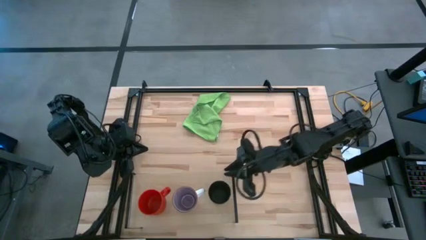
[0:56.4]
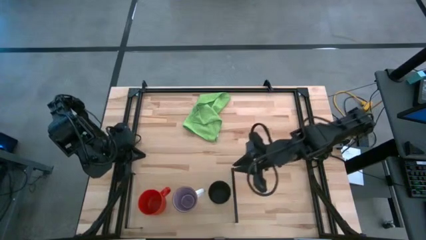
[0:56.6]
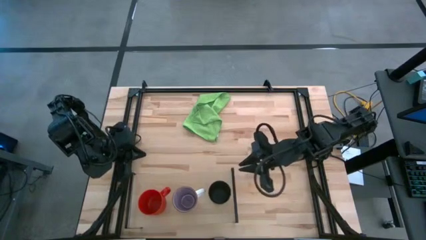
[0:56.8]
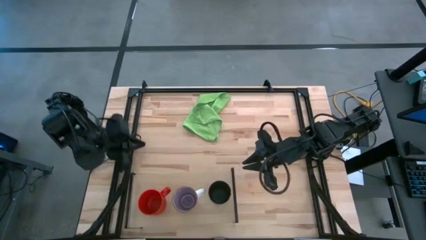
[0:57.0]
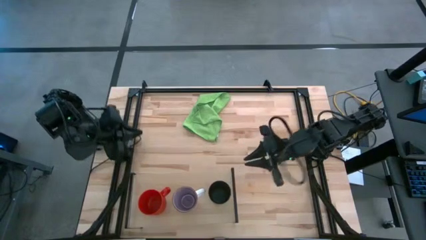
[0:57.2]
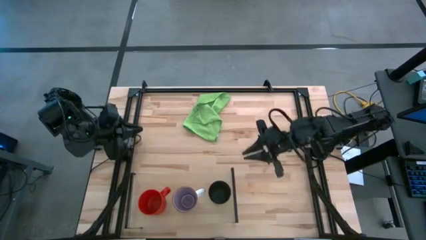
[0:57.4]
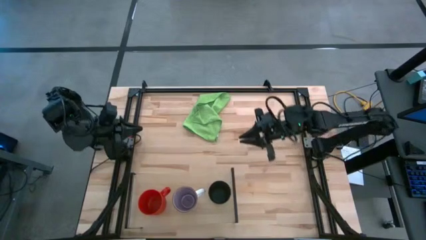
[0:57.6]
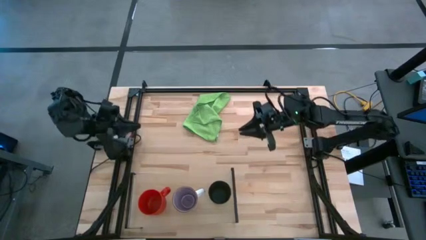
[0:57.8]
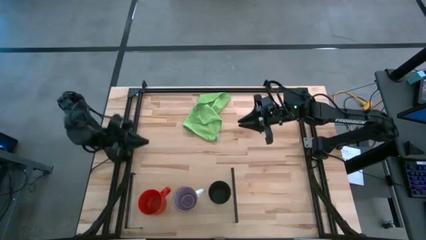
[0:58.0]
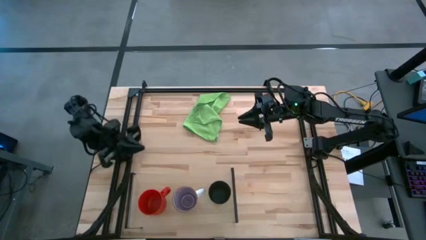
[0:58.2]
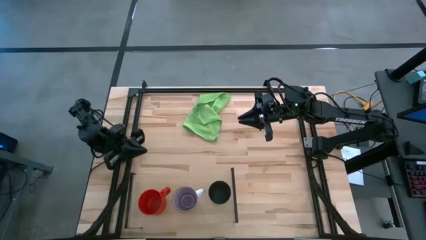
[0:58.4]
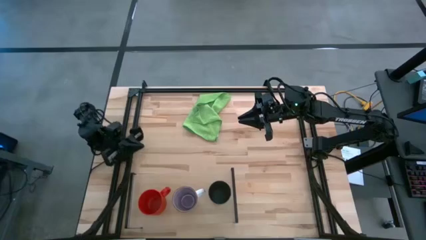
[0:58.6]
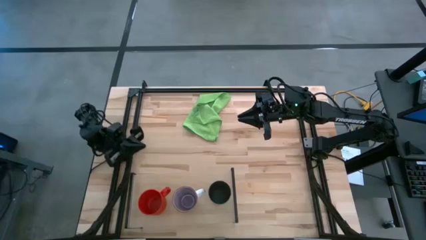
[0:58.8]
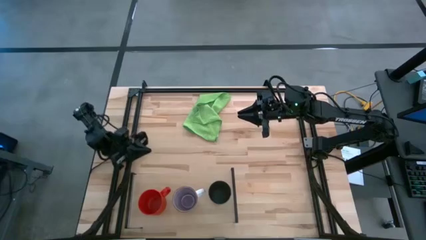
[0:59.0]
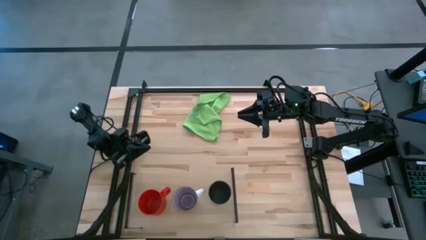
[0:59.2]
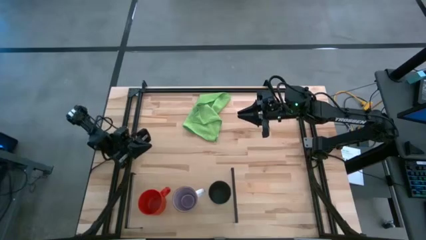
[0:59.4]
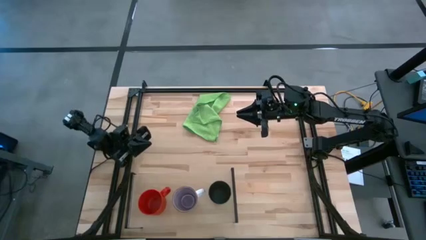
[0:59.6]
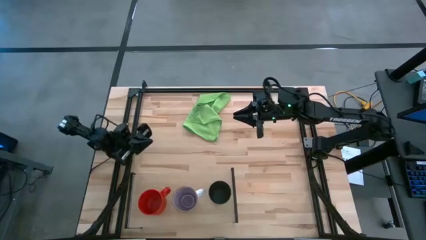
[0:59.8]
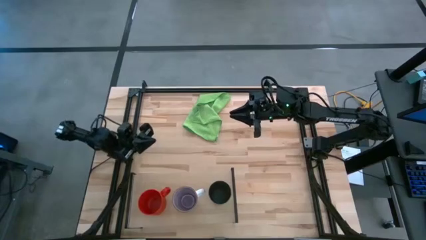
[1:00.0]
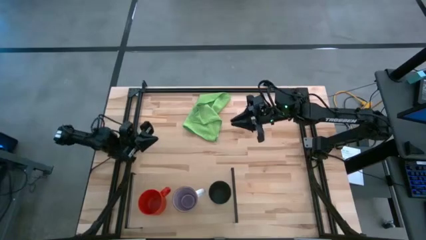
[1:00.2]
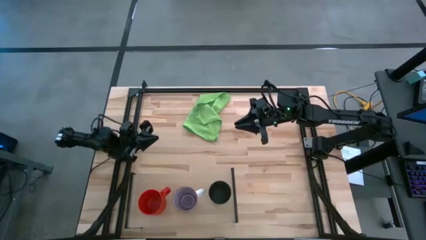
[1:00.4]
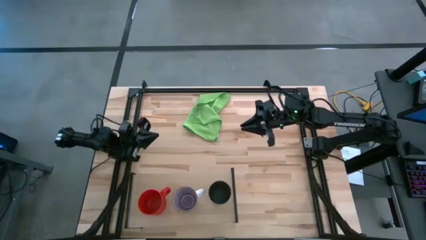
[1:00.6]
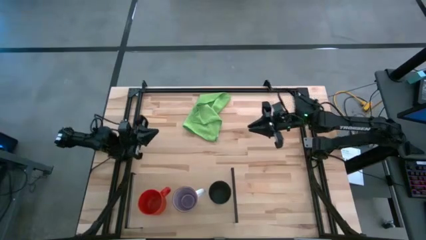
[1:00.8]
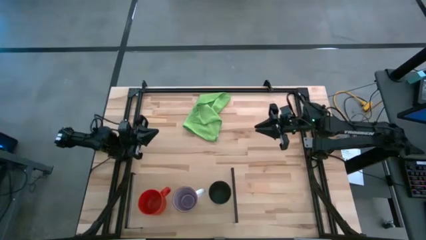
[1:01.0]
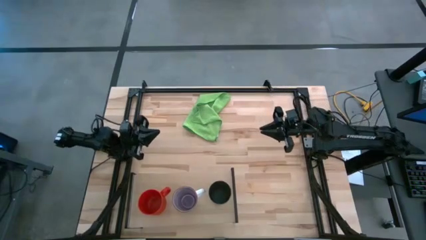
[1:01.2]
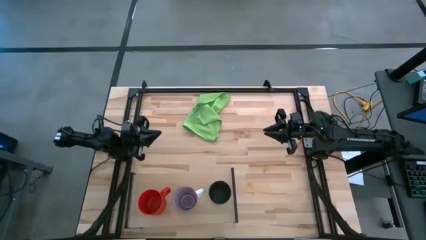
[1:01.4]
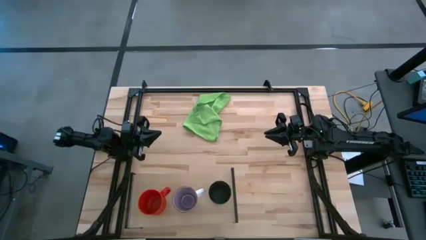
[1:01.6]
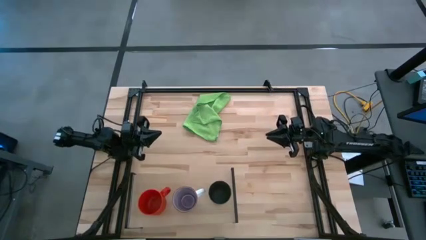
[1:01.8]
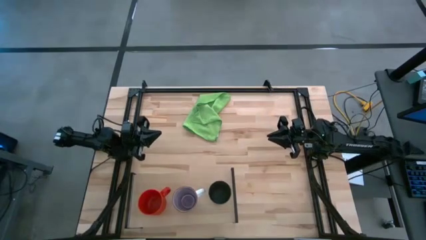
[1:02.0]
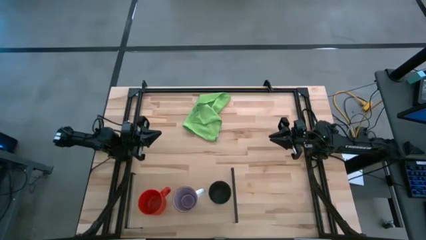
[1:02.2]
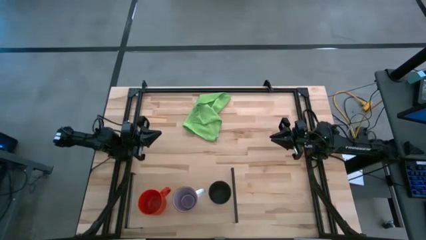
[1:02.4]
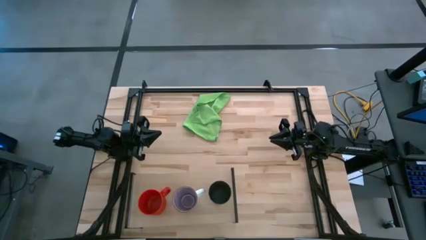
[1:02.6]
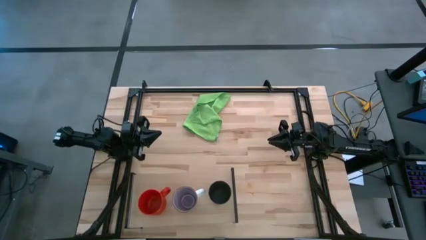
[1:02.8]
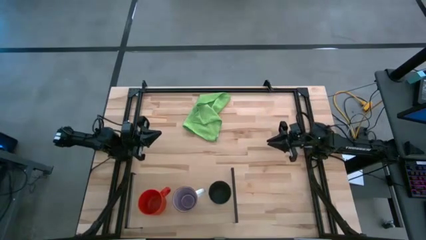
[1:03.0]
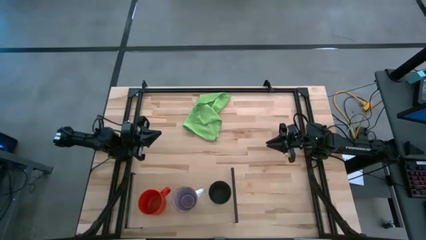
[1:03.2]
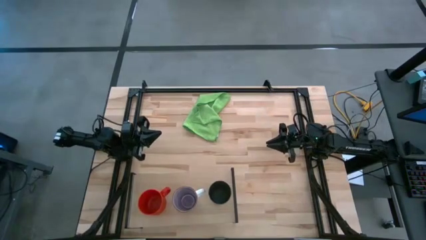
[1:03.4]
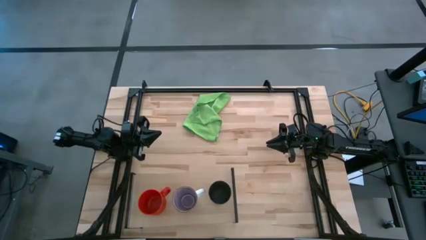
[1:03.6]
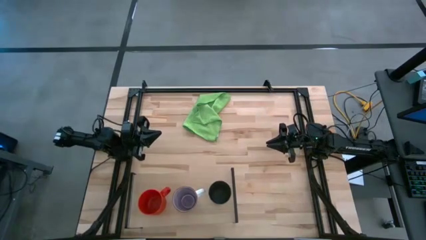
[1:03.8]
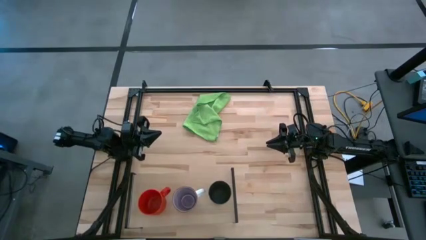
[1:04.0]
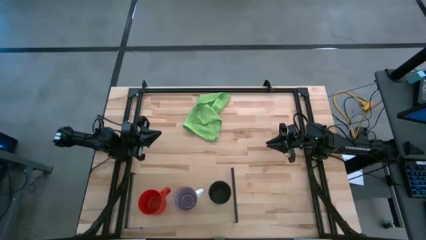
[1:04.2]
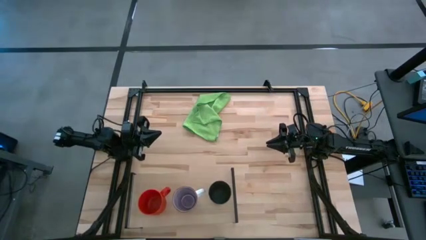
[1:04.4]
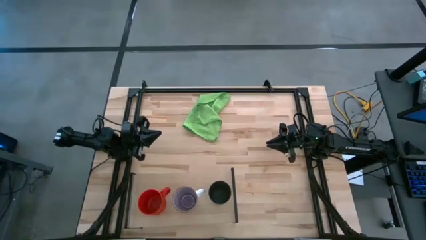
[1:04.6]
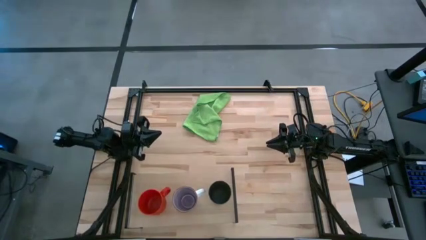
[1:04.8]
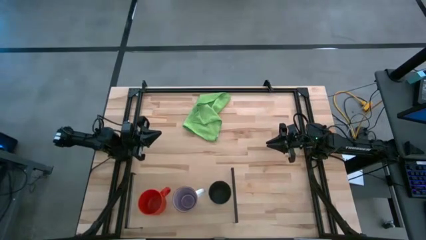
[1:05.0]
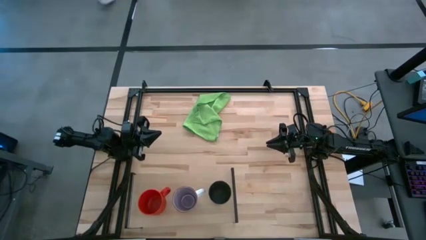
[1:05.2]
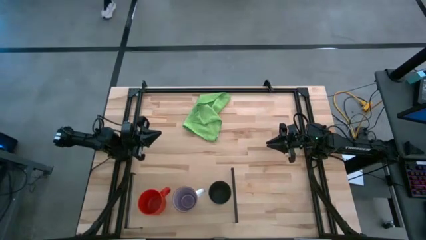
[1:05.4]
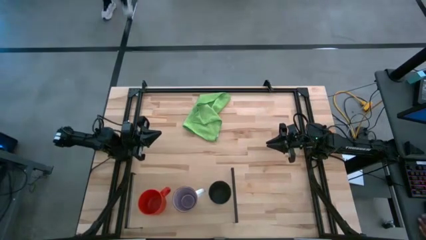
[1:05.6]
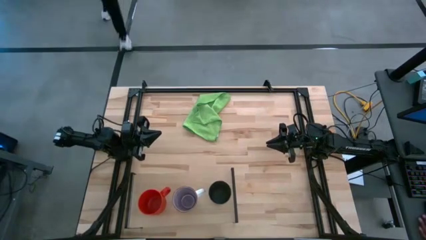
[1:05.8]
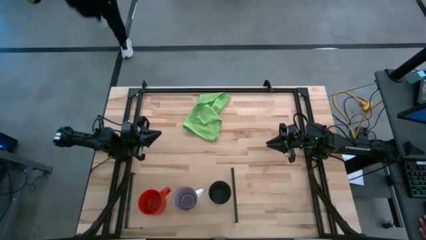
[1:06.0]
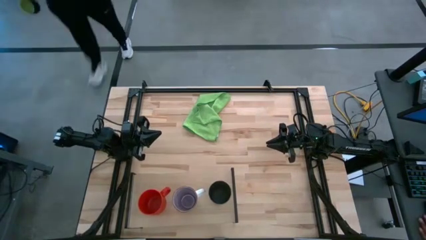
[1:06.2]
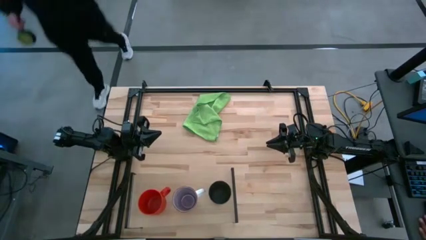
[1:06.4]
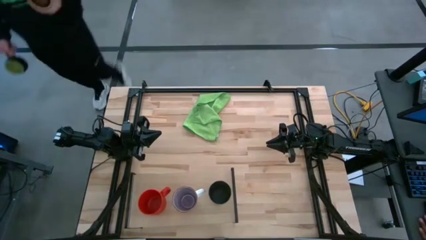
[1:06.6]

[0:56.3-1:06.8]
Task: Stack small to large cups/mugs on shelf
Return to Home Position

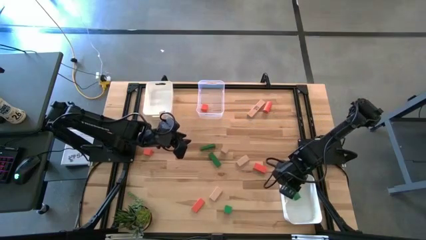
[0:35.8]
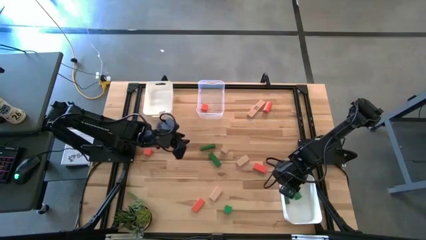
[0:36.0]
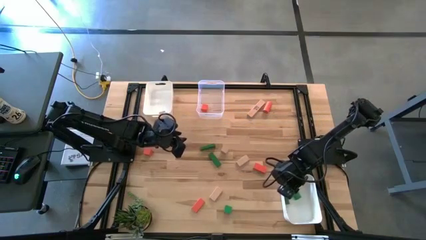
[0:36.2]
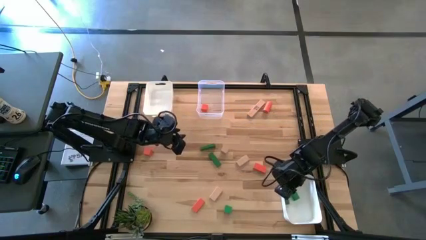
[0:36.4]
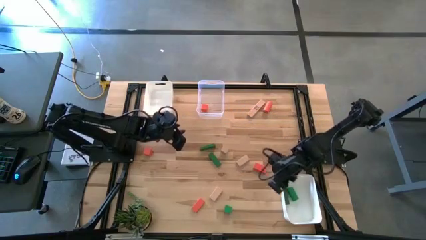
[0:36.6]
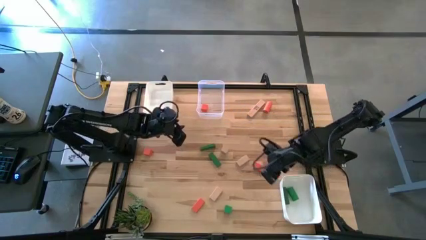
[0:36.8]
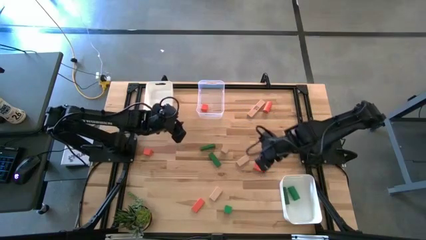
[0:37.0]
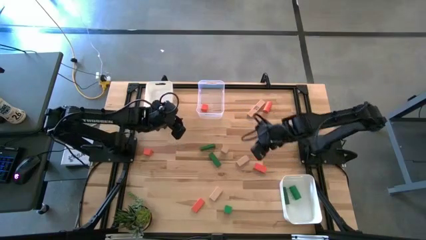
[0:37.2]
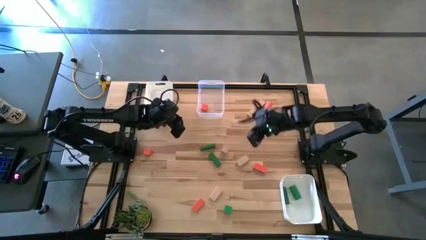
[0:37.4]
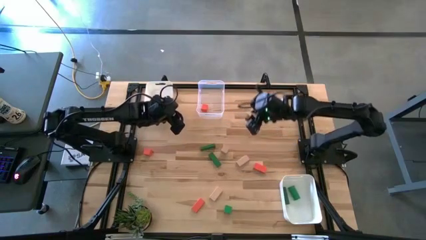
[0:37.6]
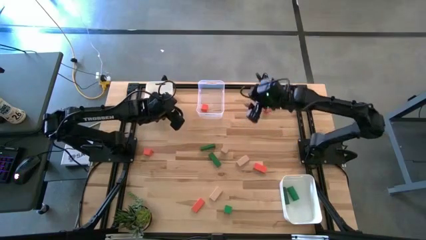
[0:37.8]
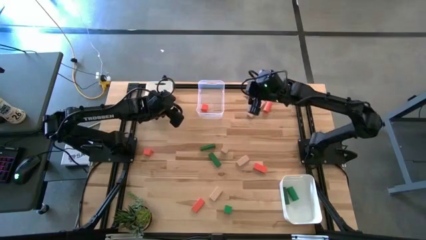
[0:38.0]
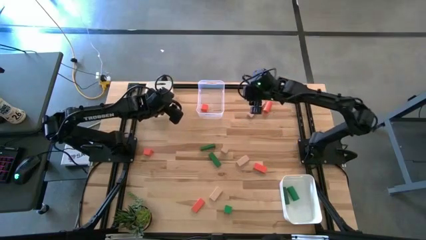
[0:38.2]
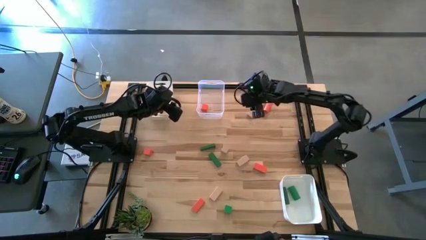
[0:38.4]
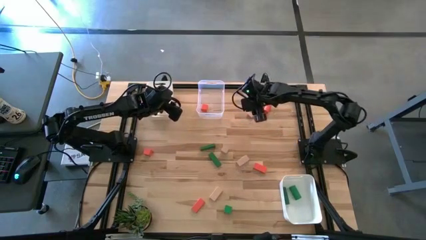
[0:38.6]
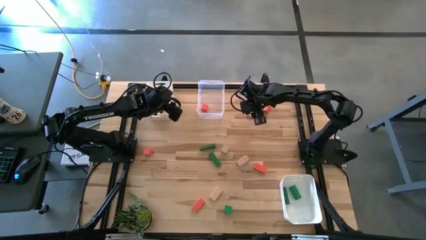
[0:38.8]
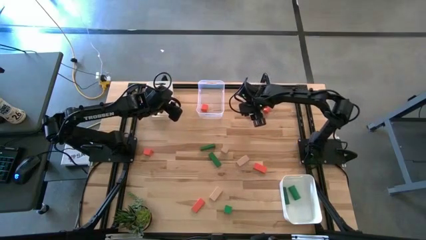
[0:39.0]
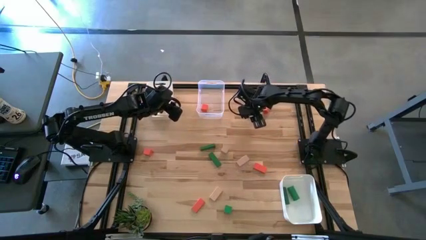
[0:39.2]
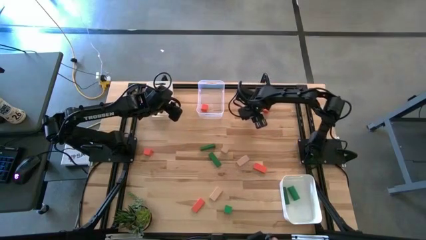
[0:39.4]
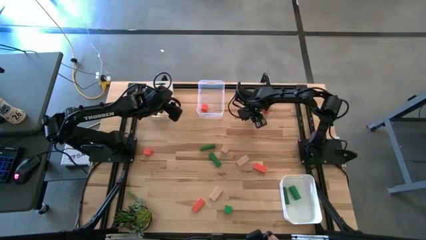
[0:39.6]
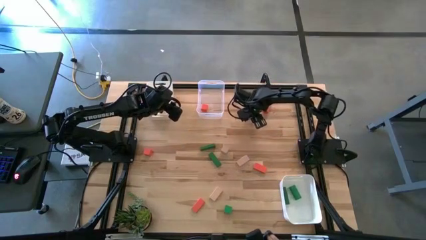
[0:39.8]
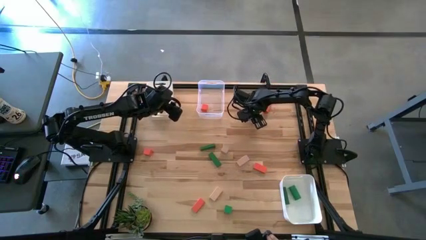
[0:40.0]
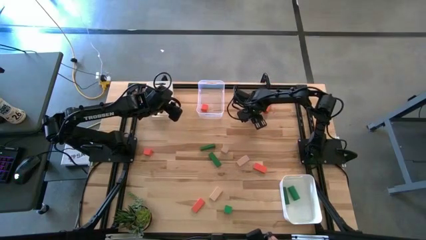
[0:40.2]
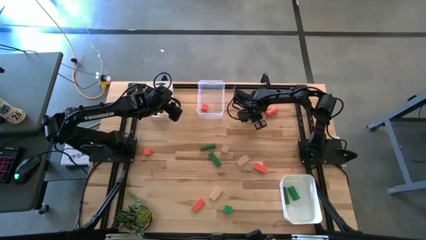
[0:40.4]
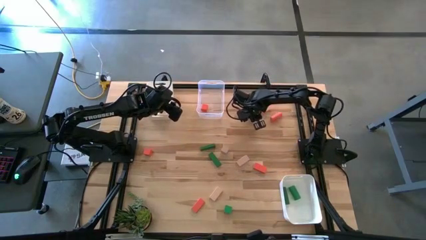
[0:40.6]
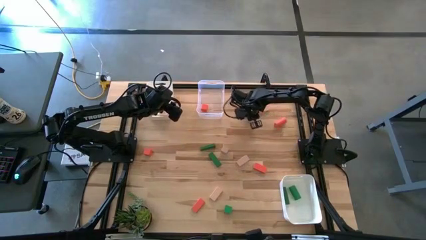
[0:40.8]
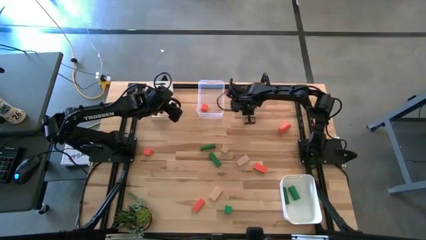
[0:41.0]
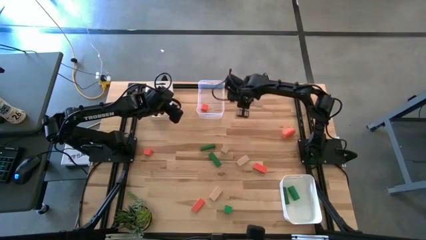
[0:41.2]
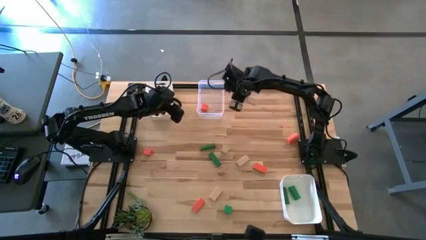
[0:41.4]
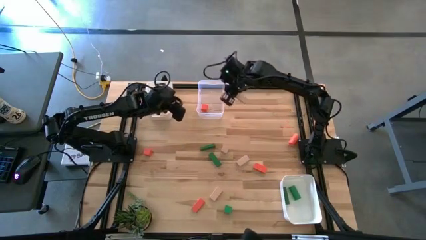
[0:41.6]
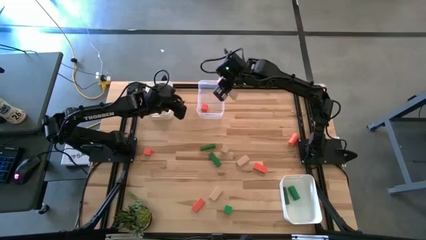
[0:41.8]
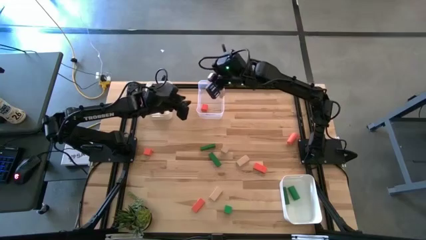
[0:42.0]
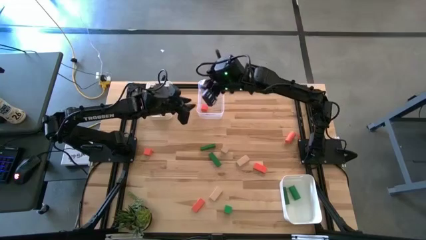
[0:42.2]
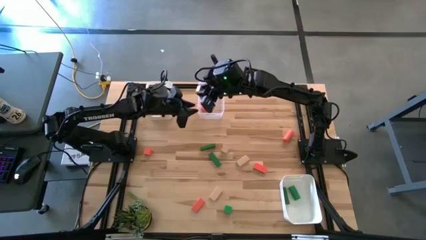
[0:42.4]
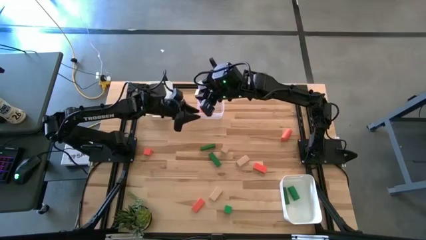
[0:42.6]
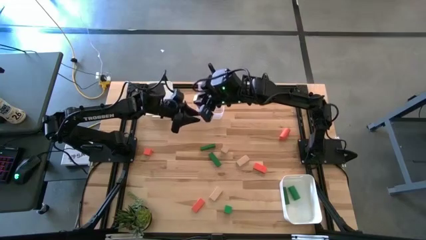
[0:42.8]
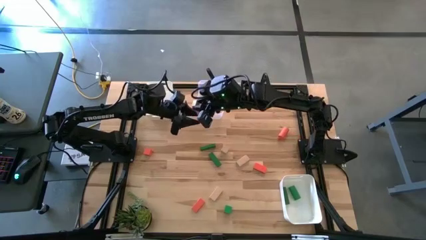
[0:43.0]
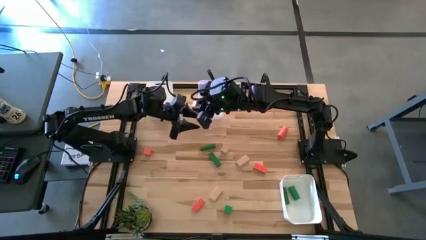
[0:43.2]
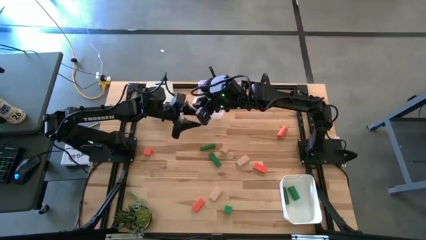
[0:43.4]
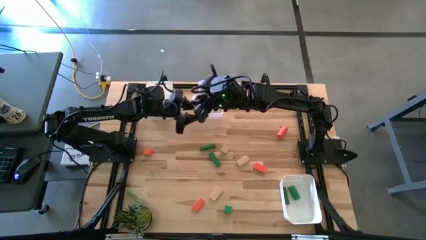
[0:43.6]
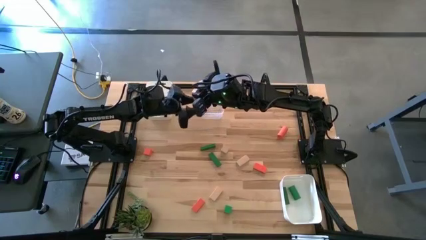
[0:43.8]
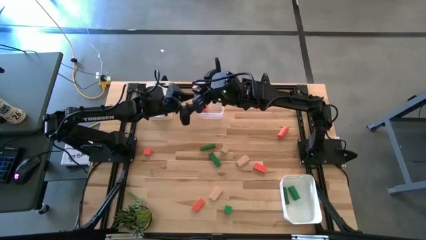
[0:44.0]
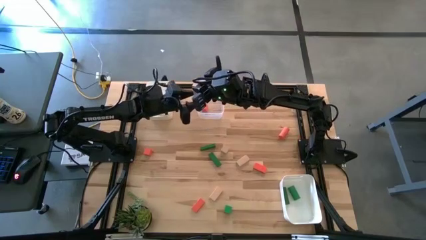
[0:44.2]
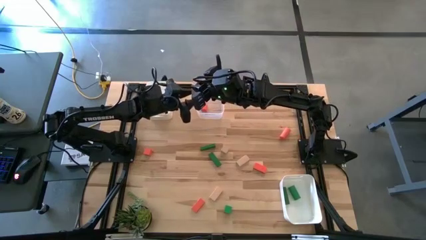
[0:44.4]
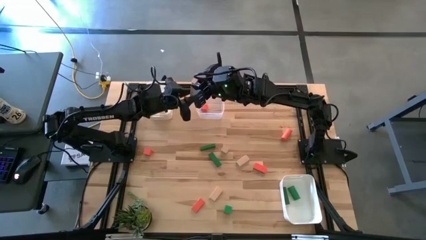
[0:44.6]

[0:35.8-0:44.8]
Task: Sort & place blocks by color
Put the brown block into the top white bin
